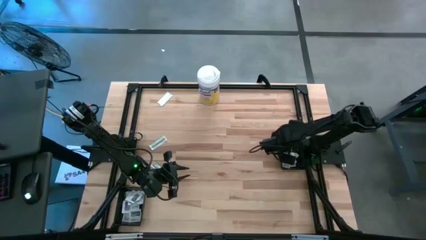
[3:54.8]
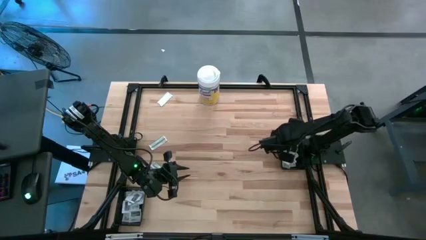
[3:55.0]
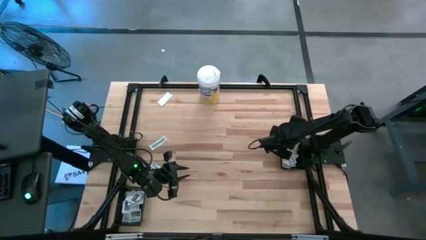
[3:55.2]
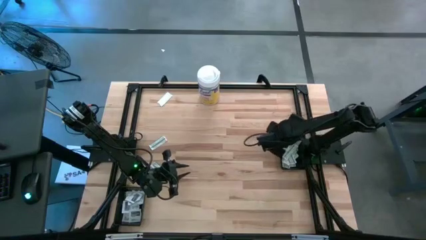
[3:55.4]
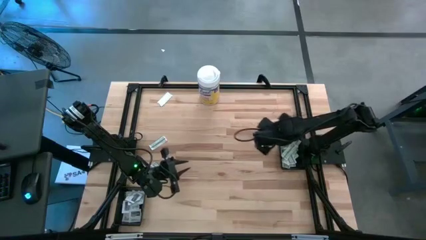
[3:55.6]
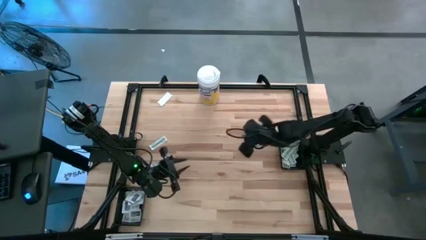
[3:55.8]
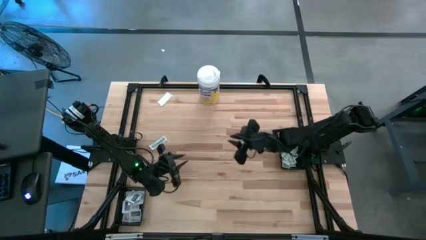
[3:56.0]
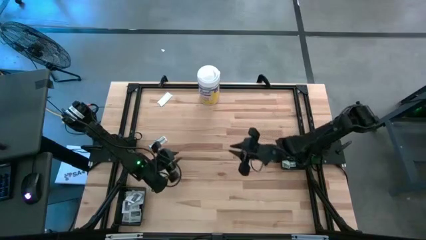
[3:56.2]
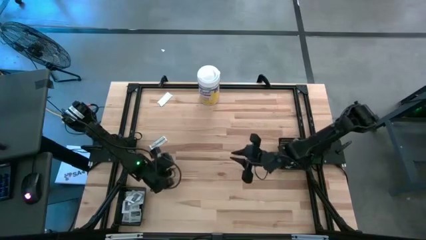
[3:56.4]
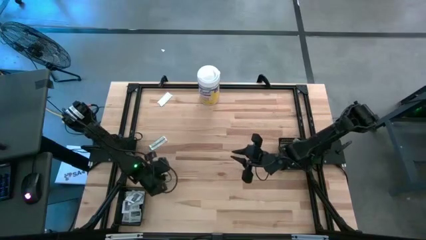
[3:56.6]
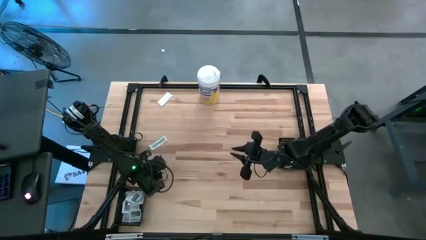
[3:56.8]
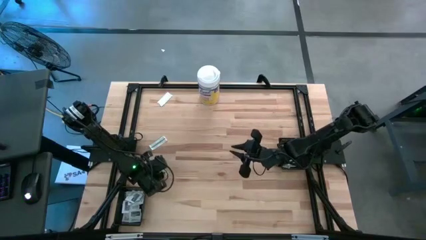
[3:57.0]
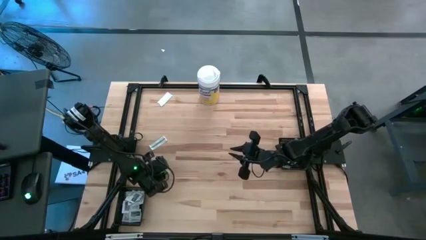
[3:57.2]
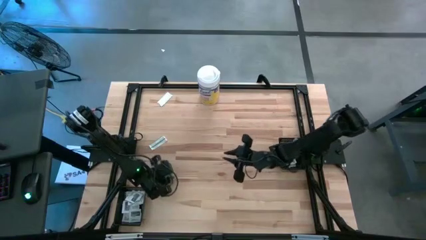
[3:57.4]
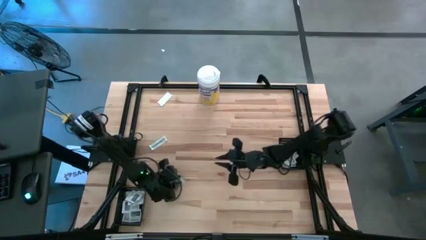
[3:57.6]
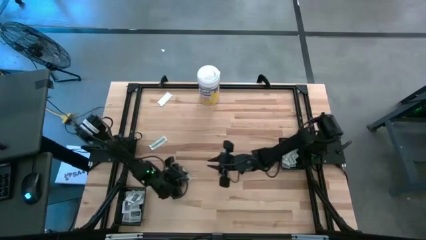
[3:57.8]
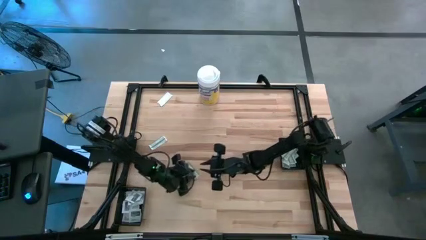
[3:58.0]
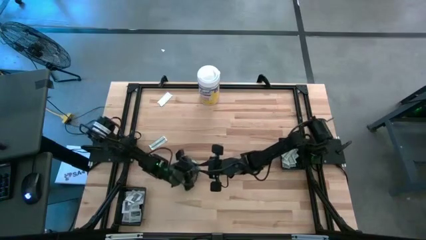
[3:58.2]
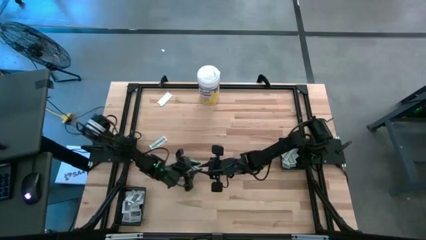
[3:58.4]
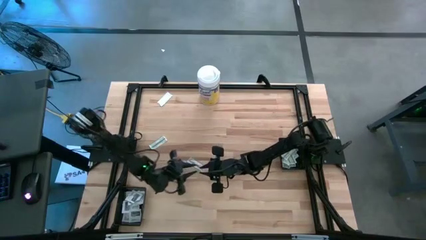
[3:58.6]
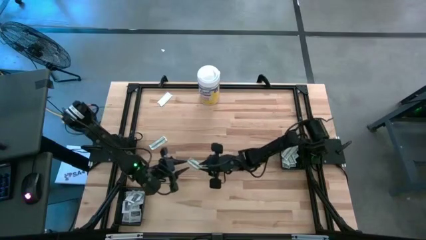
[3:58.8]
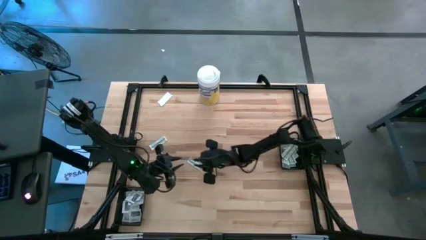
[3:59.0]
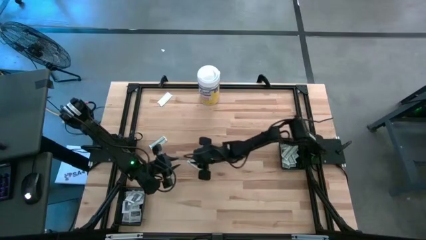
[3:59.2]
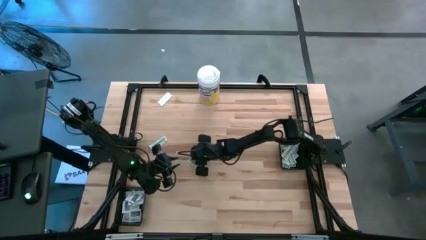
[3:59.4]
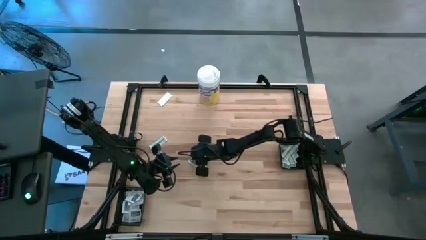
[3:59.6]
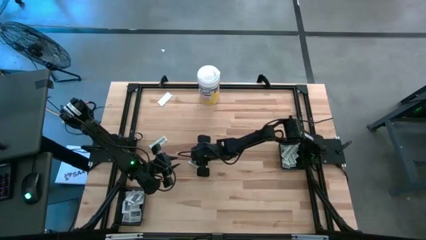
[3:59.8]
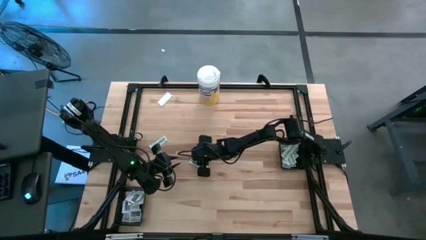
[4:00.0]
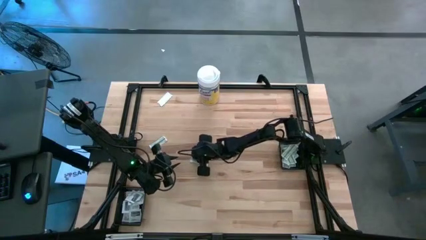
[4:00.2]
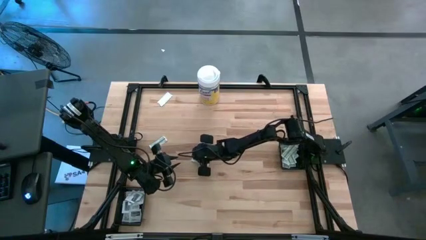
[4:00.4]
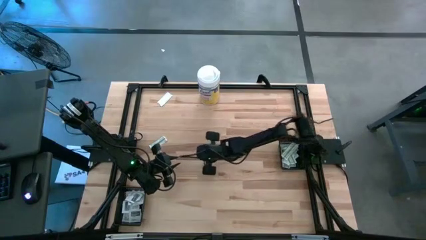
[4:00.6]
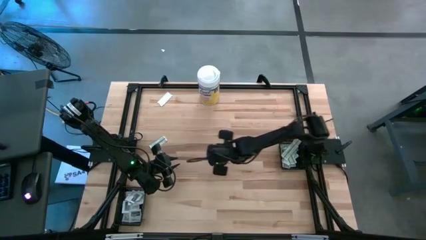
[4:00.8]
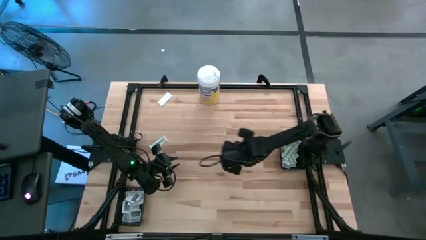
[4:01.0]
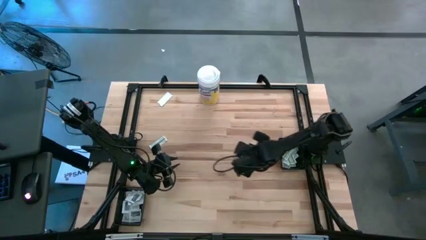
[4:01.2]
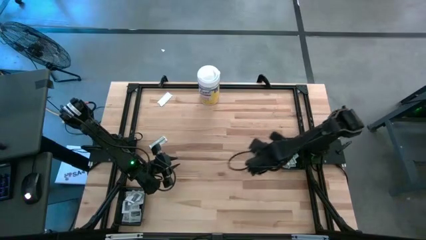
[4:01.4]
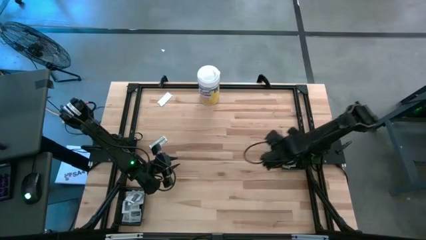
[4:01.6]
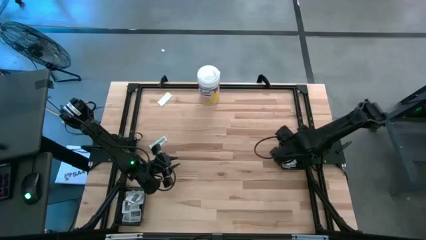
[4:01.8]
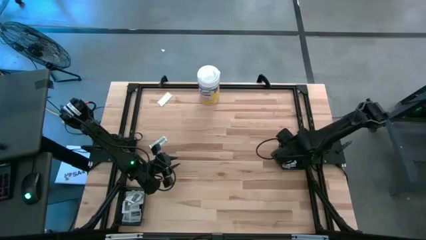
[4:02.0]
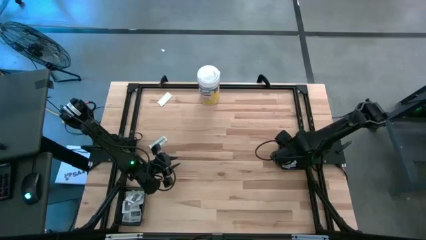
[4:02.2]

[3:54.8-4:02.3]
Task: Pick & Place First Aid Supplies
Put the white bandage pad into the right black bin

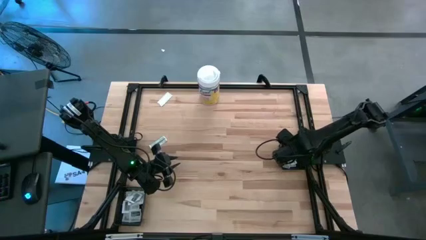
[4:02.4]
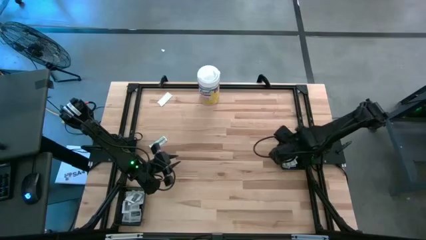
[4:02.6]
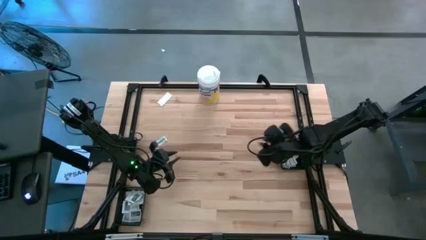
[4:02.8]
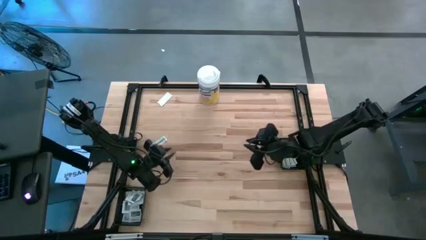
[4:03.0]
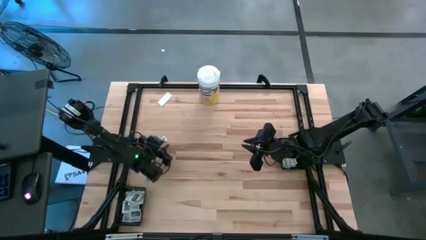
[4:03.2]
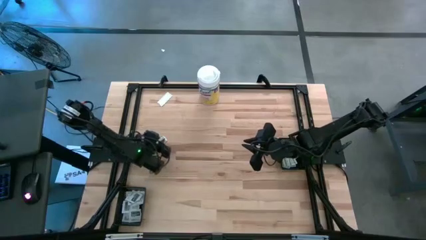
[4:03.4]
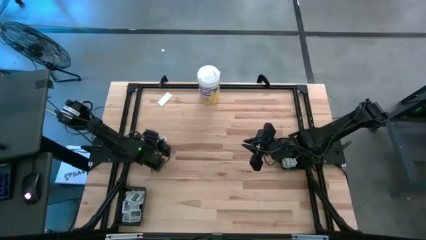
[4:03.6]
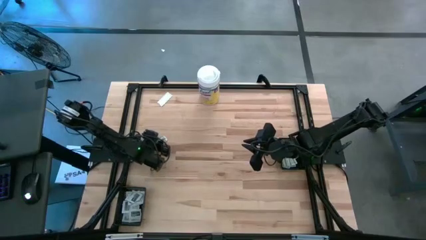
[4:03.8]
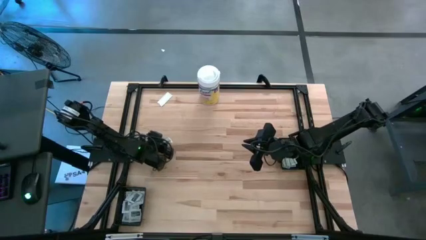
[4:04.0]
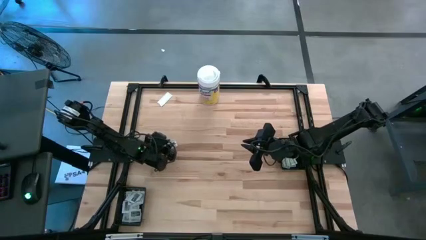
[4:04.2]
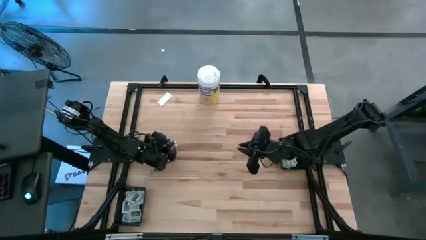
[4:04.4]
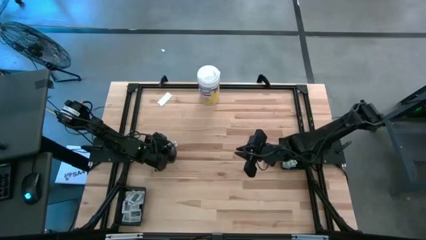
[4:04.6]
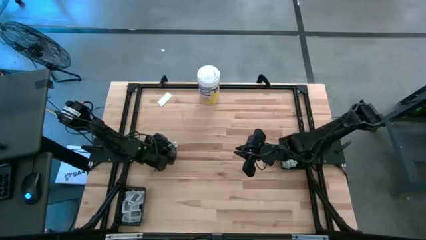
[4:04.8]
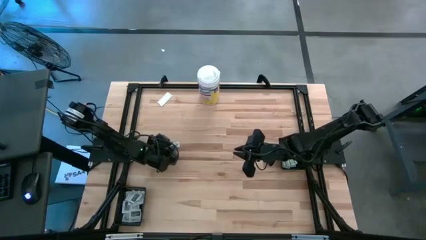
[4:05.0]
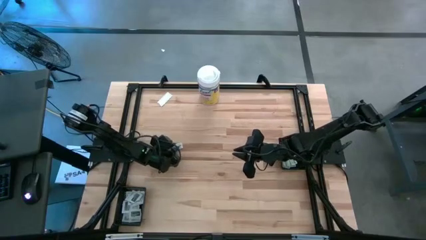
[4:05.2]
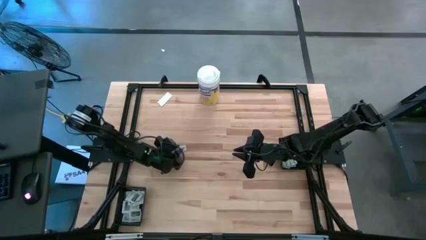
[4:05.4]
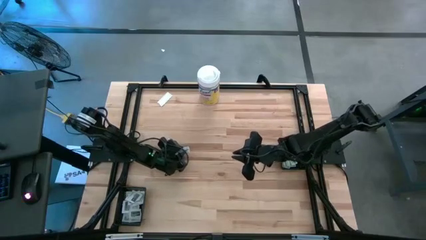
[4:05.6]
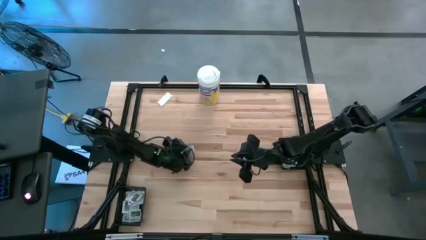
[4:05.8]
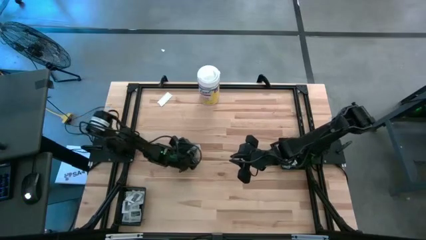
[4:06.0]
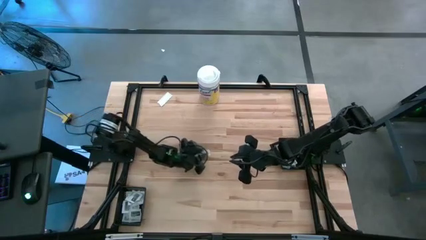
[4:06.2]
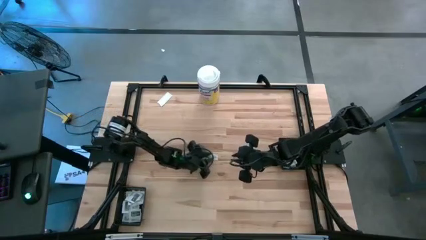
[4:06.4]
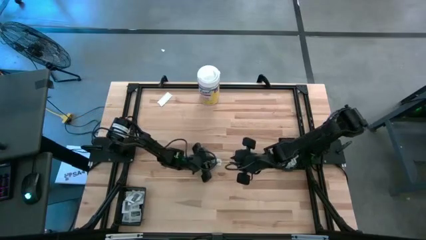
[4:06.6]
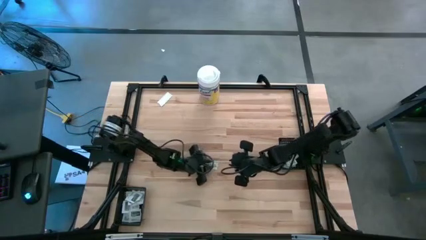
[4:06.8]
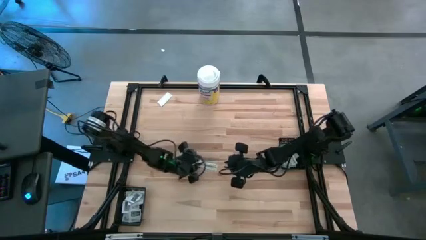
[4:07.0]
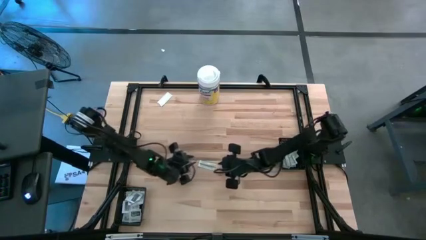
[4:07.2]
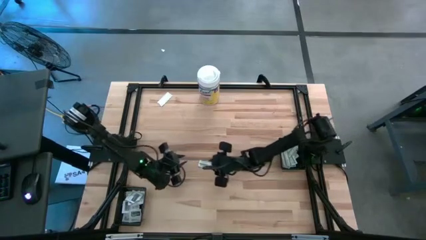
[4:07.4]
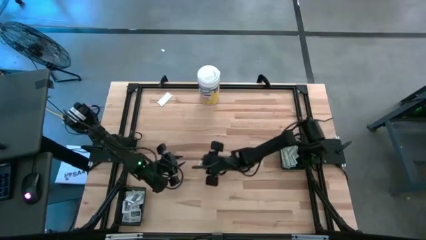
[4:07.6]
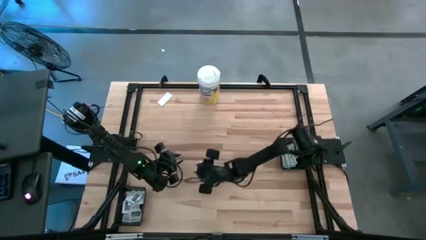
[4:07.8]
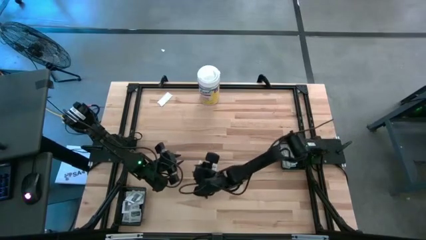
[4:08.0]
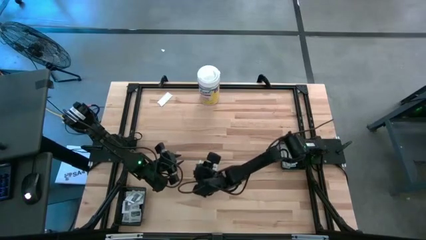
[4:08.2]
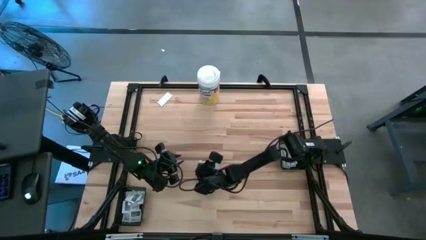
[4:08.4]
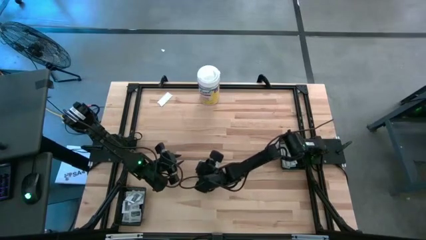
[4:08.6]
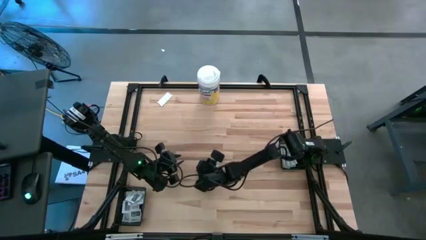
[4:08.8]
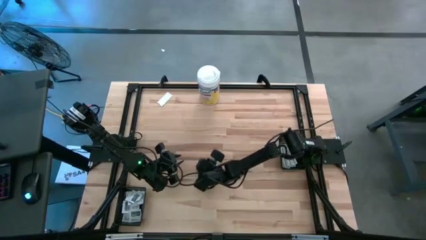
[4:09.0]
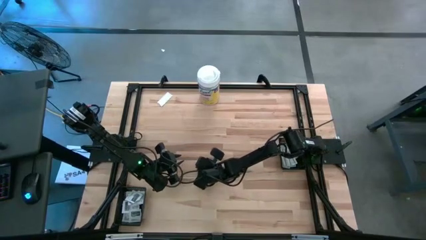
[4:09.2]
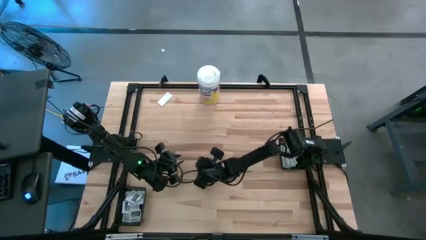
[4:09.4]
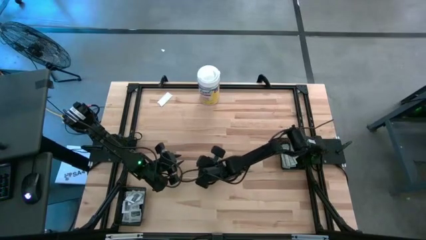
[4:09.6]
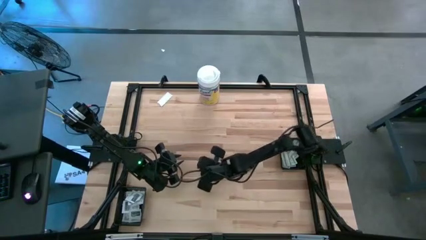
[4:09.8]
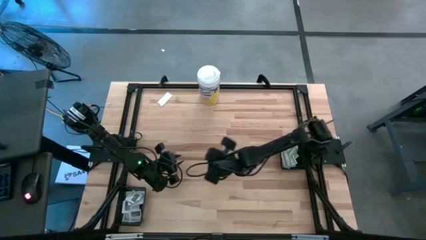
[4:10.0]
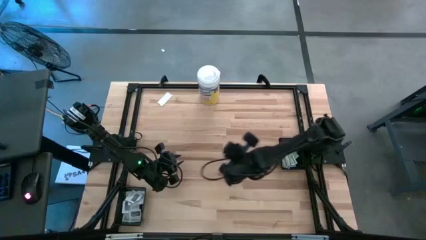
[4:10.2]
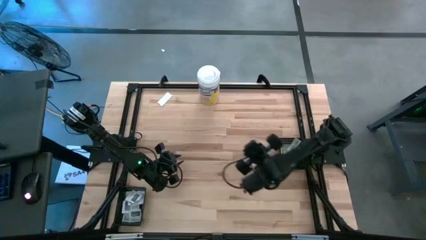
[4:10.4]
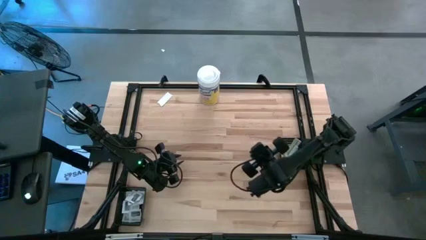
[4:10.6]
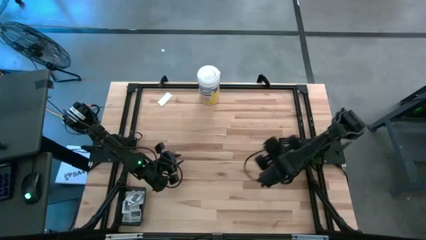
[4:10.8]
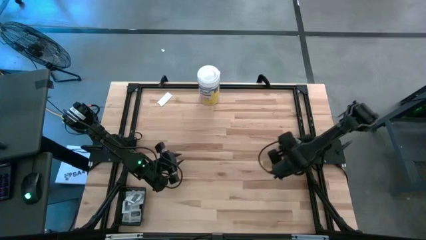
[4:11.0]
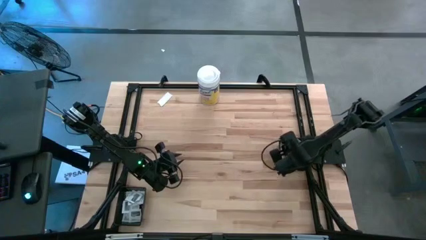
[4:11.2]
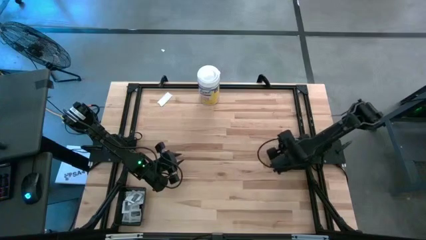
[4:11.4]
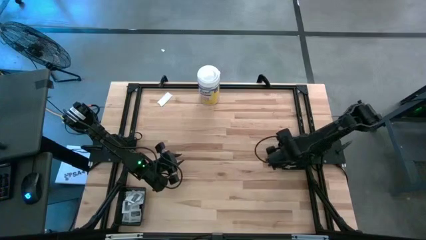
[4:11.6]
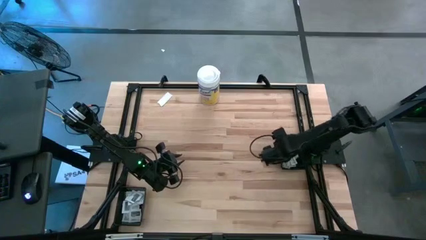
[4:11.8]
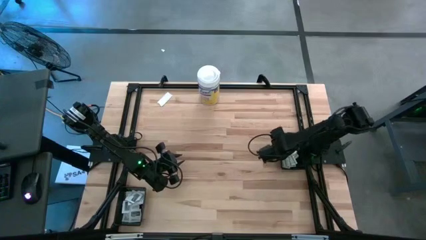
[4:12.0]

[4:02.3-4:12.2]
Put the white bandage pad into the right black bin
